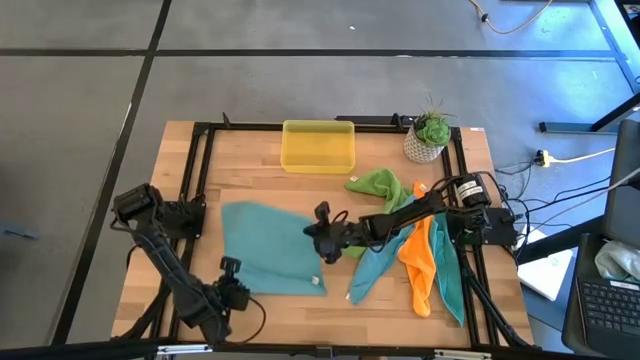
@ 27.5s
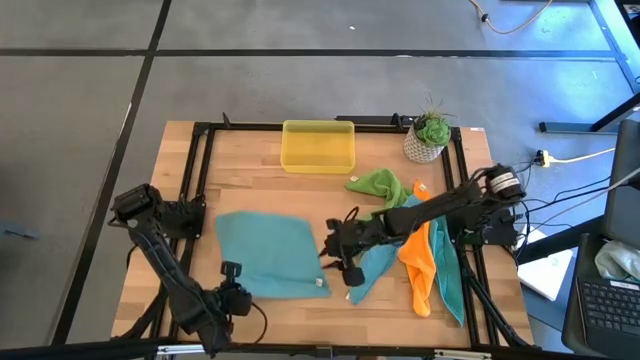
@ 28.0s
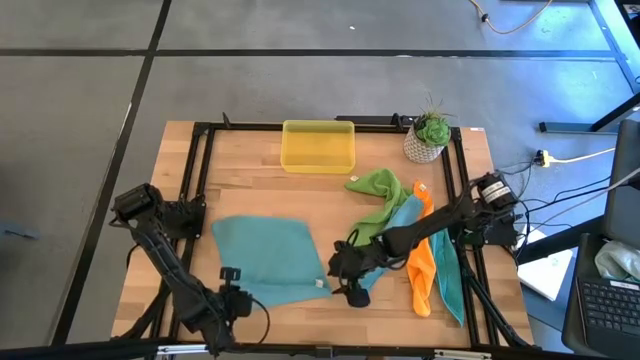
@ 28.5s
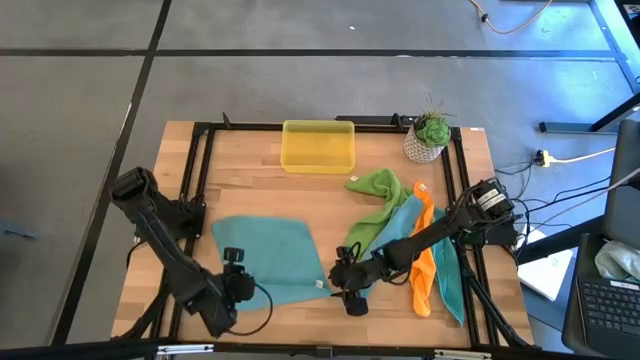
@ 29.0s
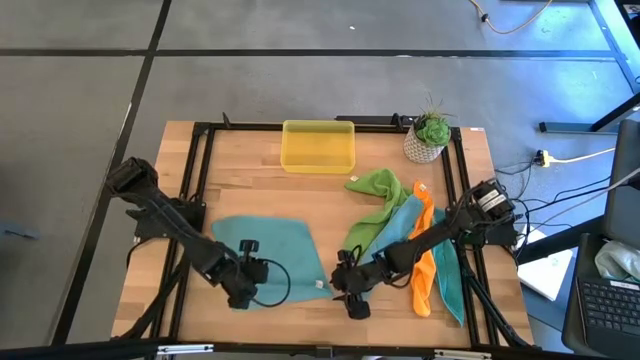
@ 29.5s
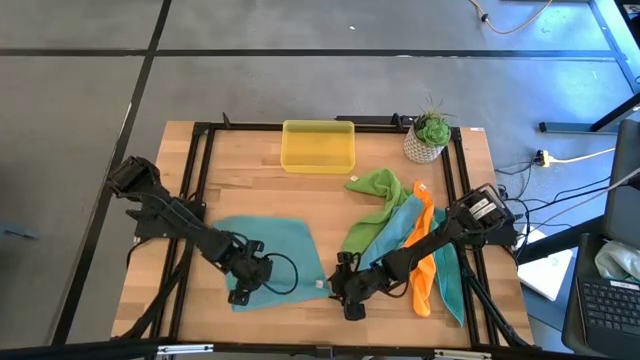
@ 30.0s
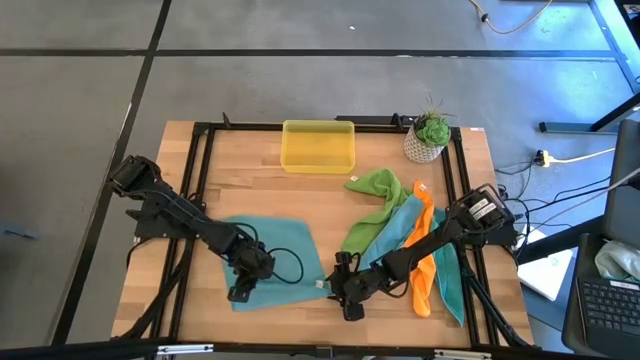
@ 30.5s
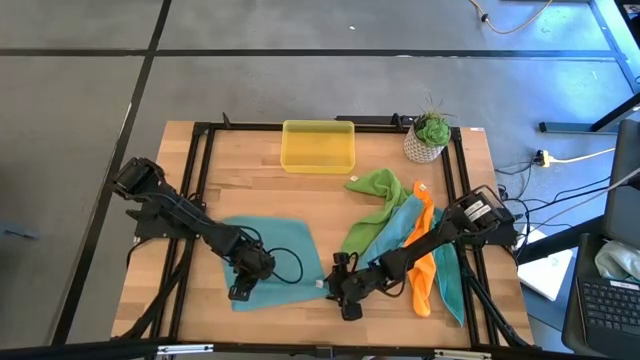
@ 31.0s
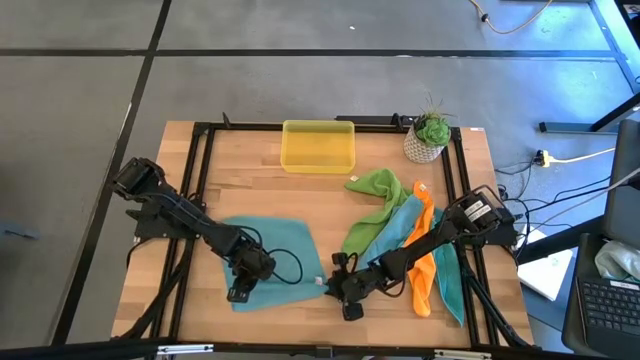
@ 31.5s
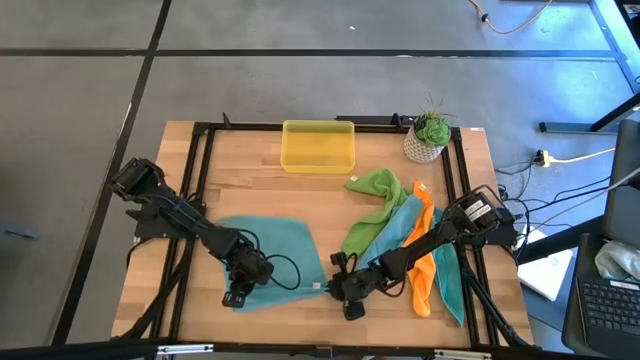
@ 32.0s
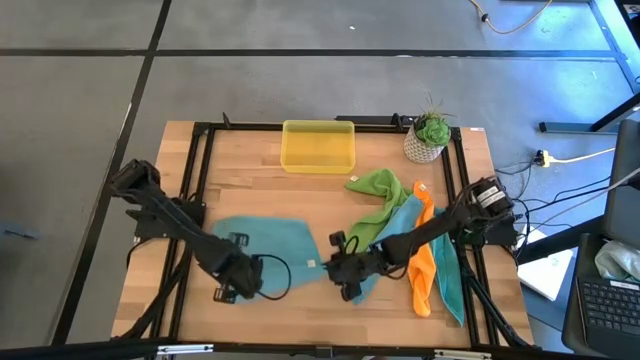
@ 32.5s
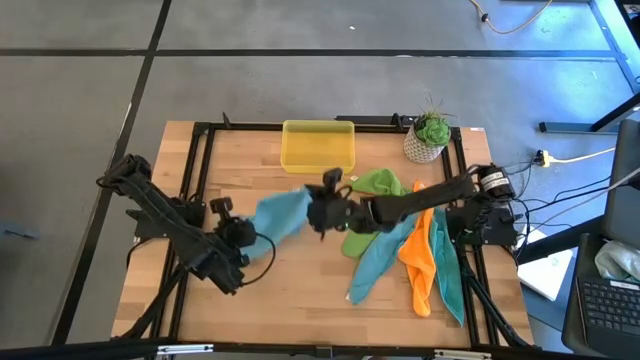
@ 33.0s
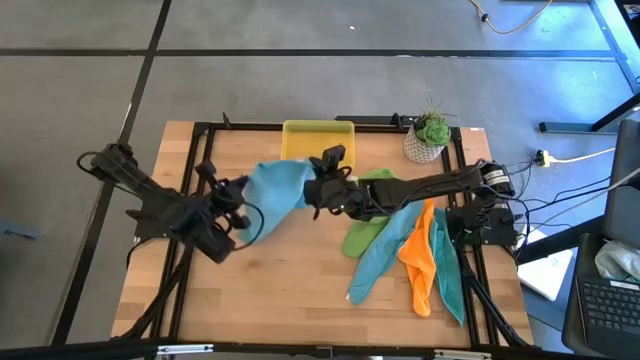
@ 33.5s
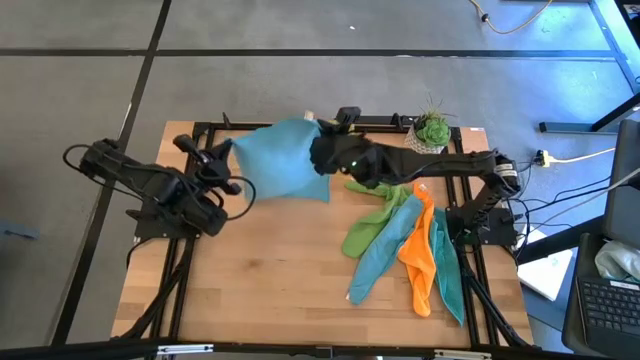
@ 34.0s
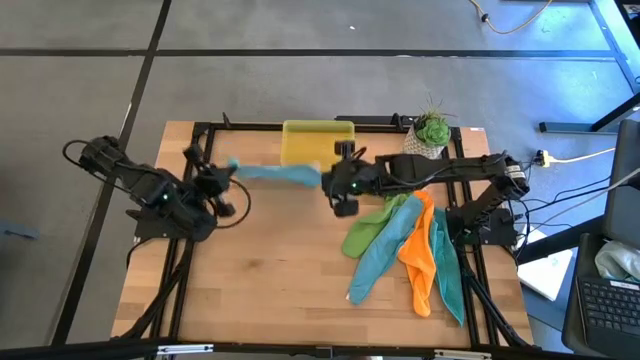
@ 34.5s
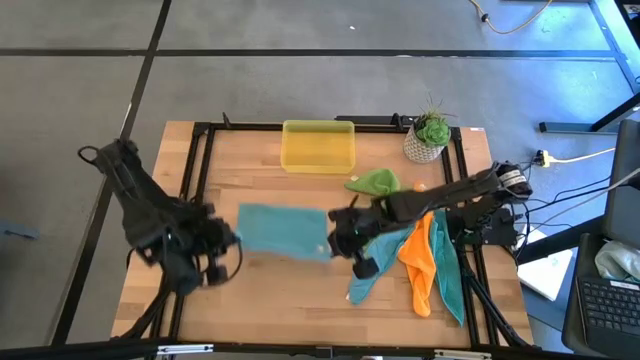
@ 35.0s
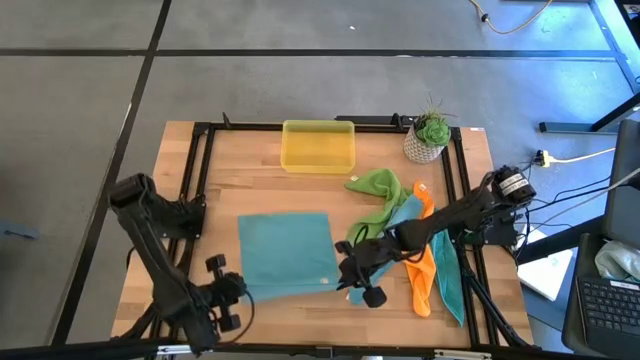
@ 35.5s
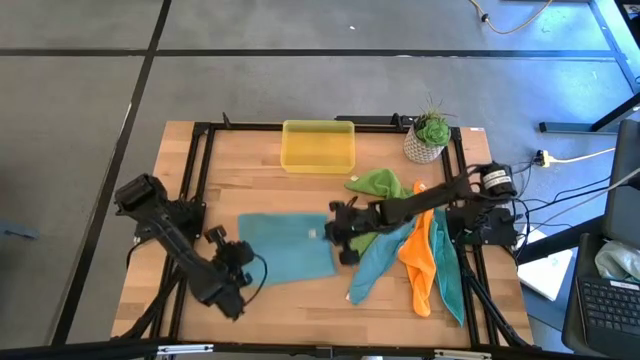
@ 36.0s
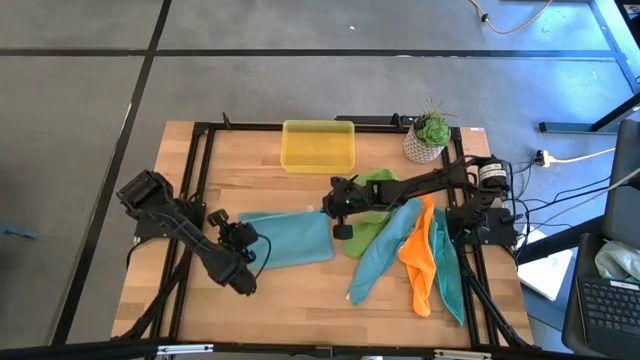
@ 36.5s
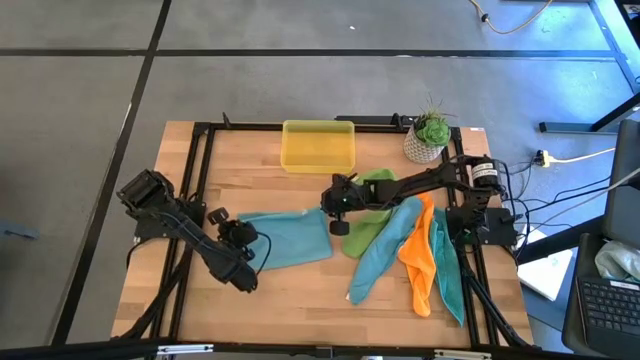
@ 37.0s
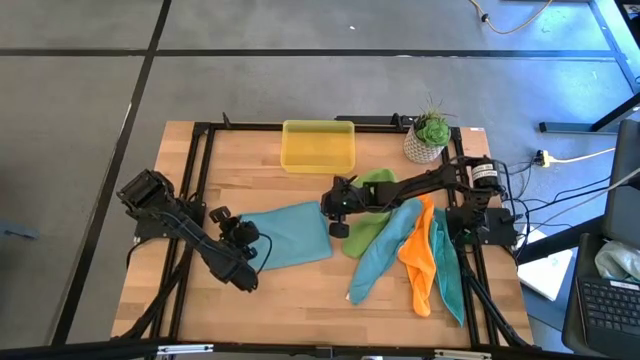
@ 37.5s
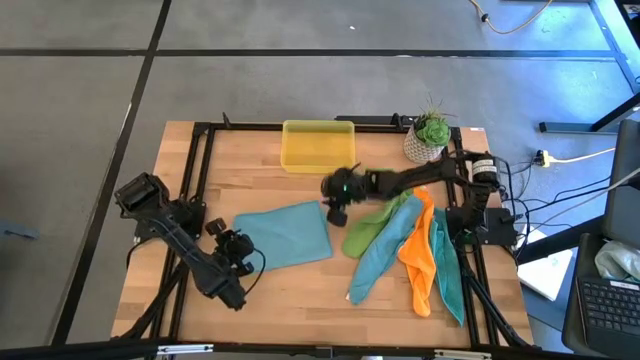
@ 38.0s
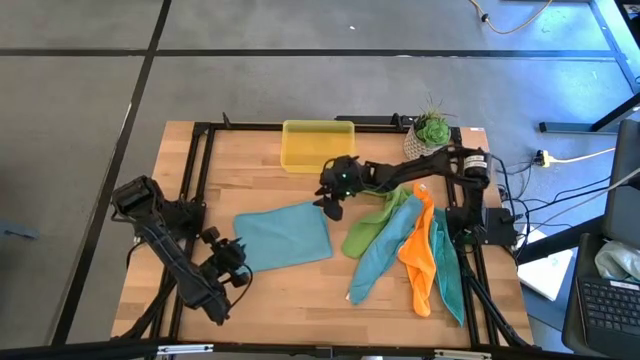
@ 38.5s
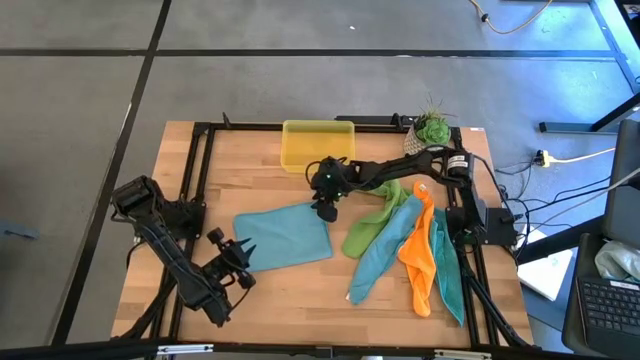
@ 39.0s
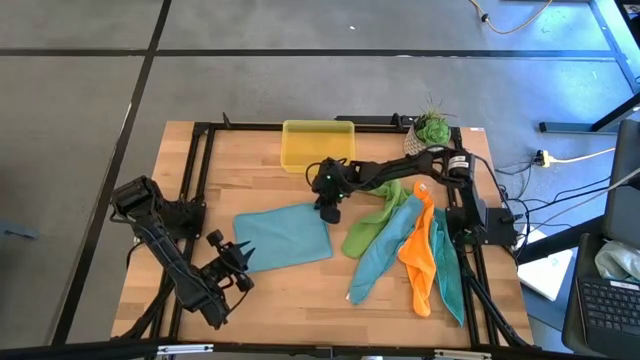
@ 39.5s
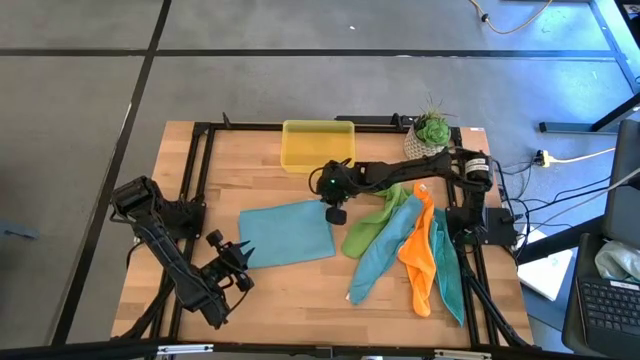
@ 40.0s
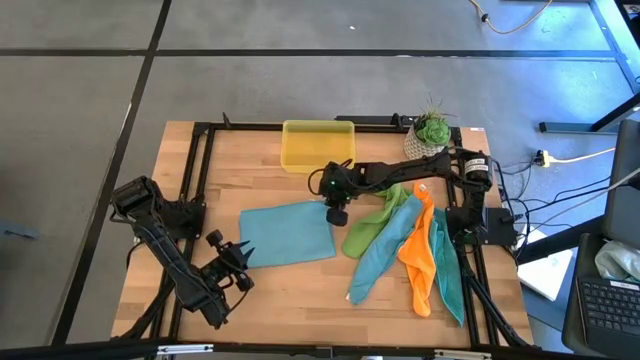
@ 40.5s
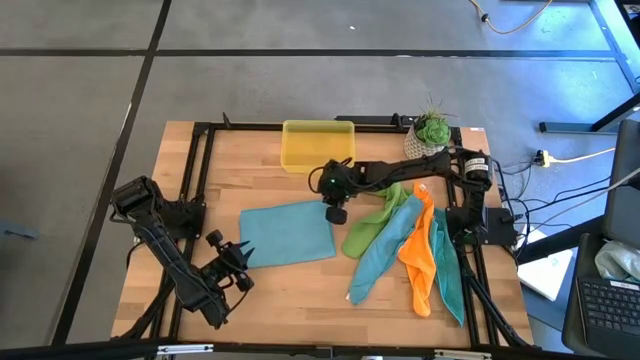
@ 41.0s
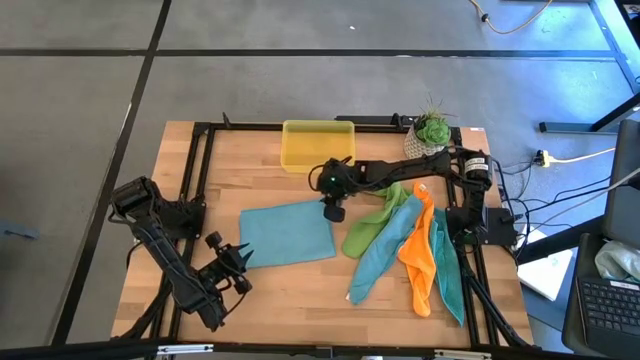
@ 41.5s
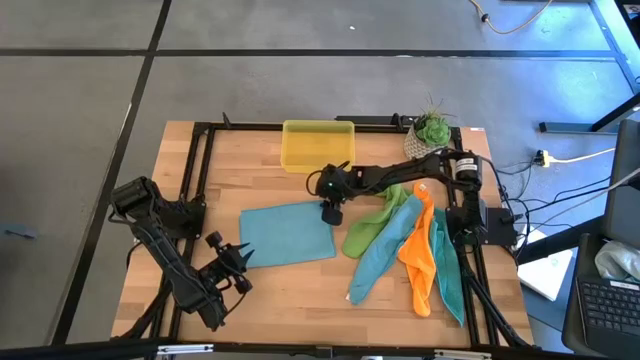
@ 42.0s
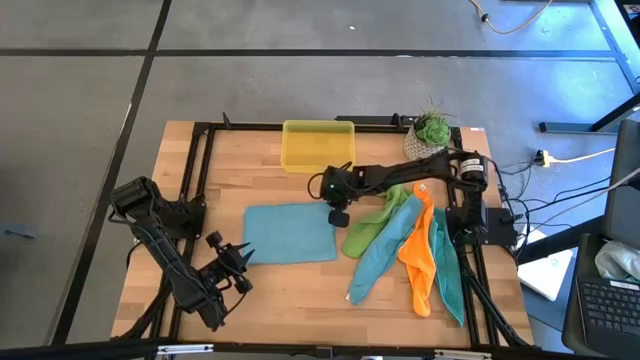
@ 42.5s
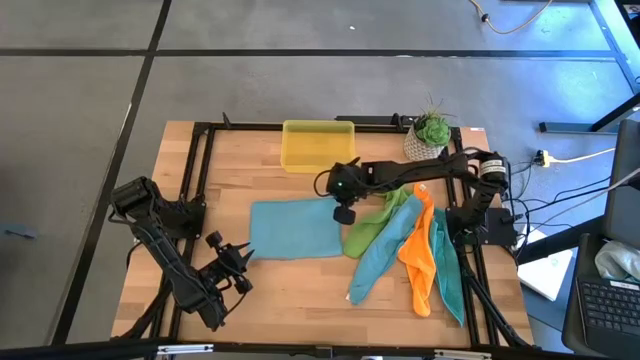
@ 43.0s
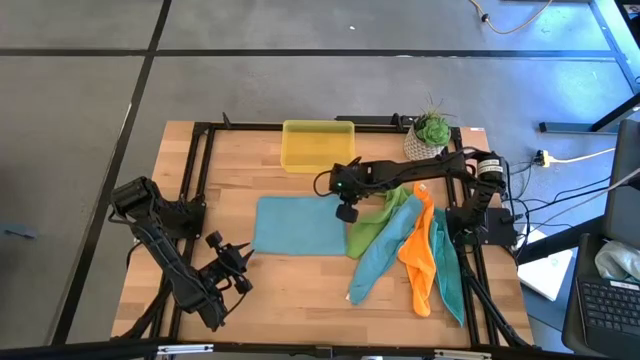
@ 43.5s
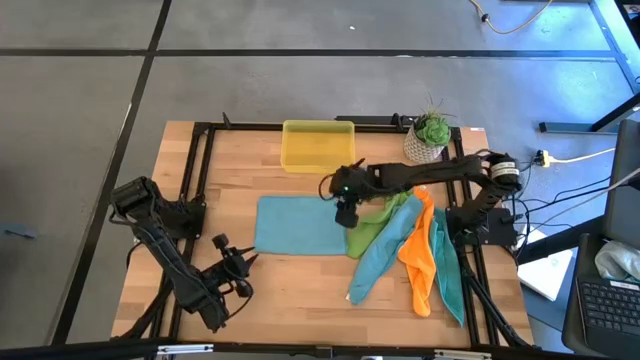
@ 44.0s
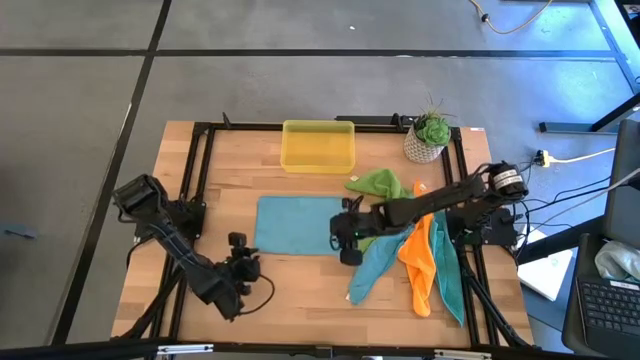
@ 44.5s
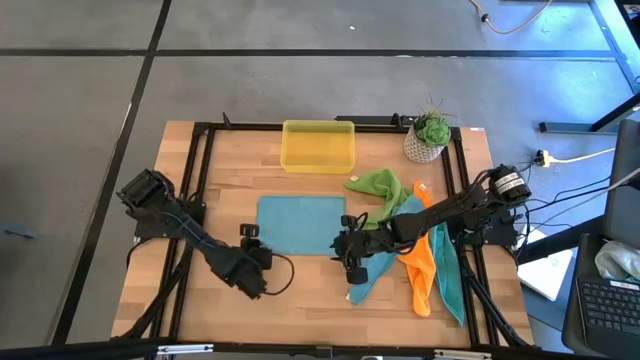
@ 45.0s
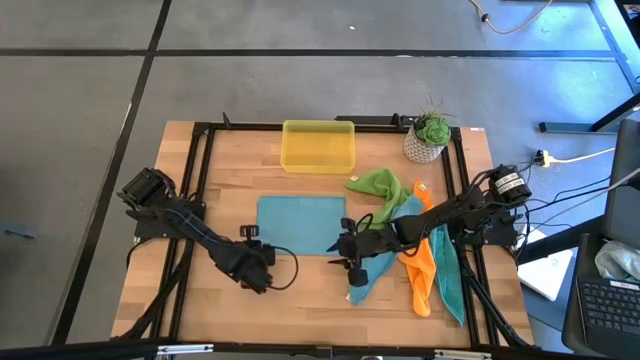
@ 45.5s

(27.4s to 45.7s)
Task: Fold microfiber towels
Fold the left blue cloth

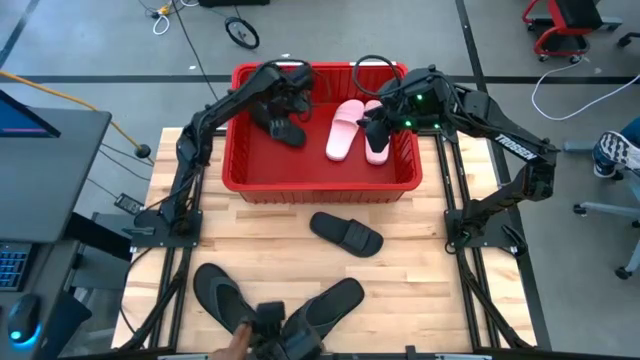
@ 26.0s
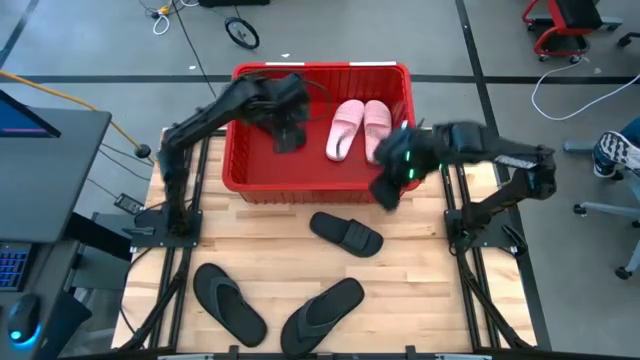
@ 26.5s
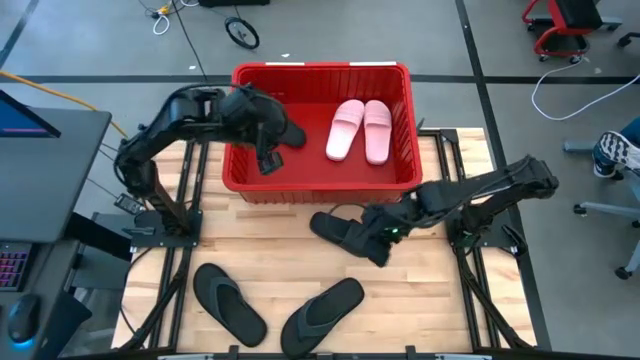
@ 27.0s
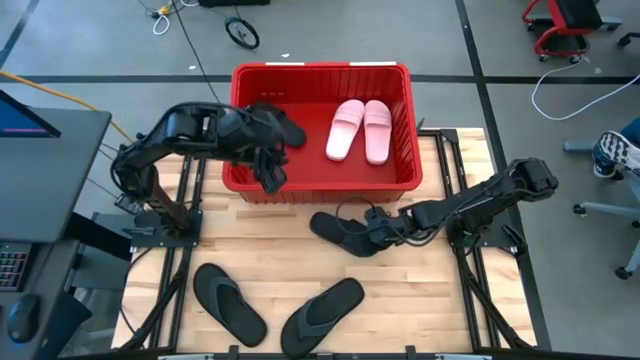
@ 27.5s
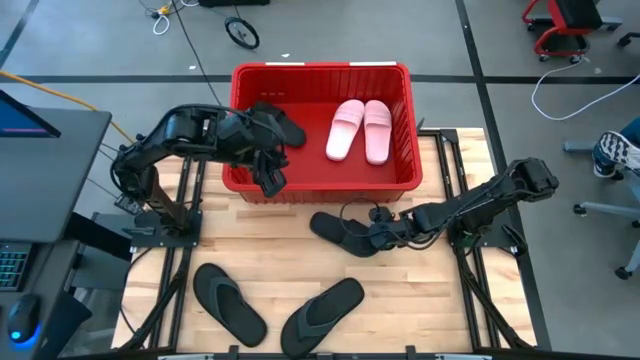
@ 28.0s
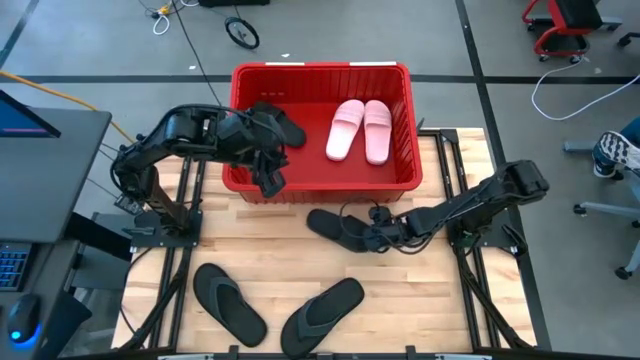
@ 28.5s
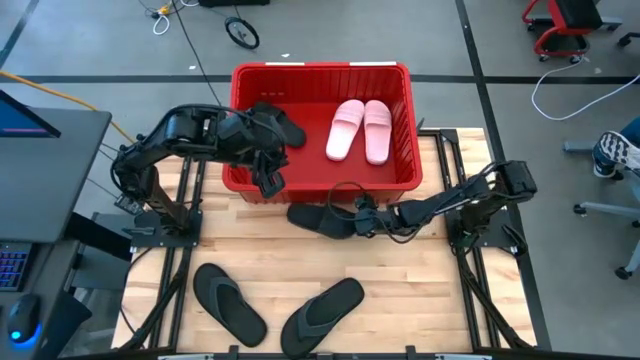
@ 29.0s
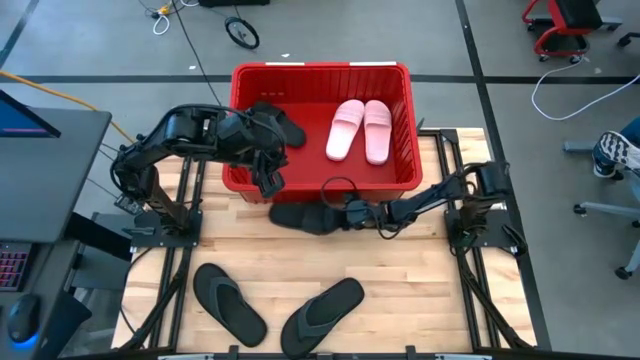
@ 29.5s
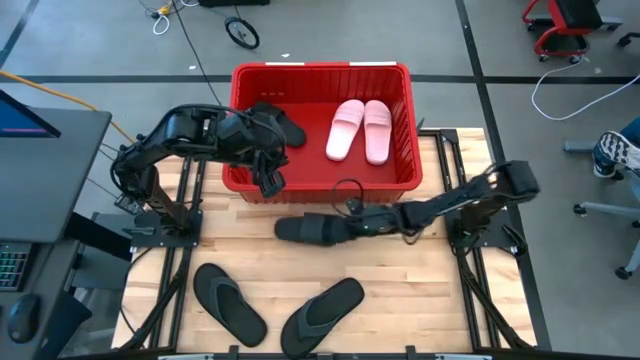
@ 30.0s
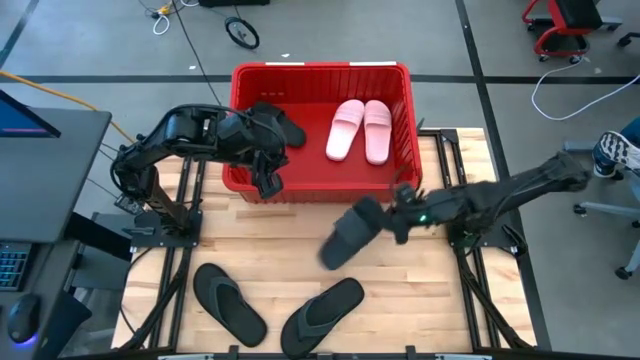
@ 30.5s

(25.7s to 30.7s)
Task: Pick and place slides into bin
Put the black slide into the red bin
